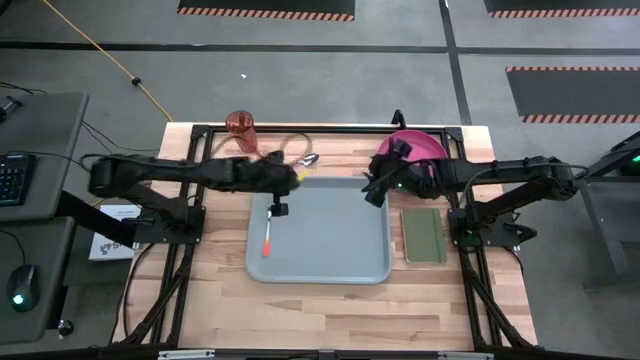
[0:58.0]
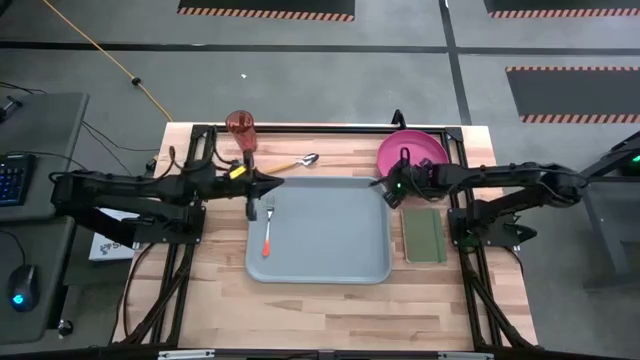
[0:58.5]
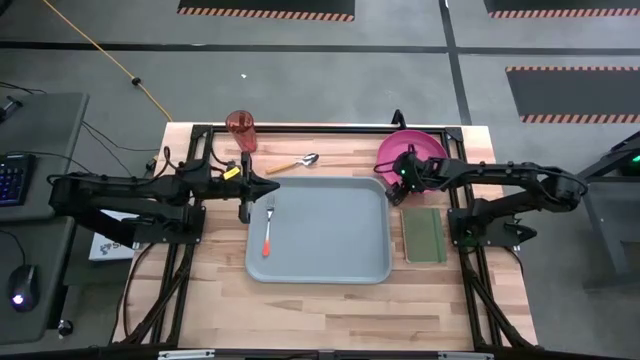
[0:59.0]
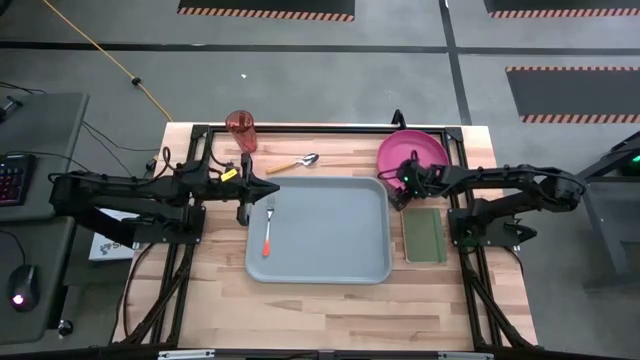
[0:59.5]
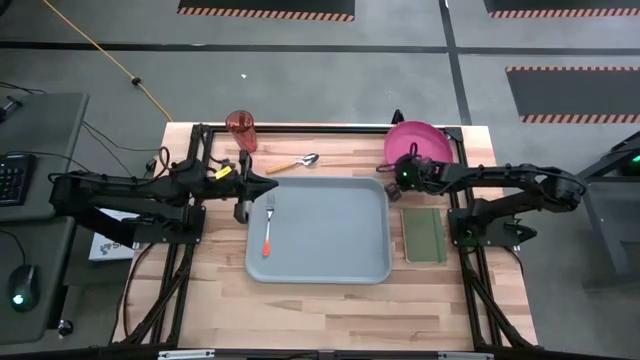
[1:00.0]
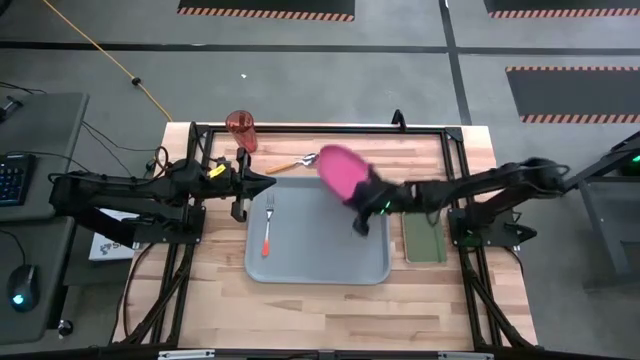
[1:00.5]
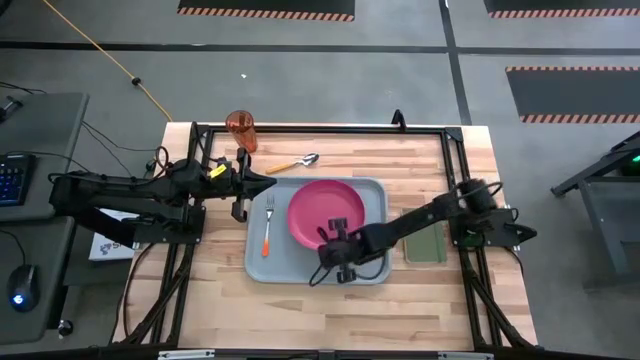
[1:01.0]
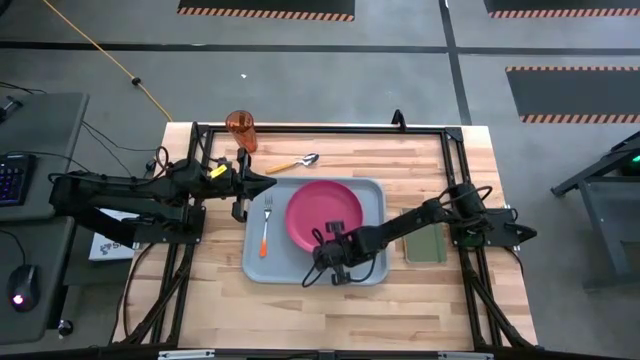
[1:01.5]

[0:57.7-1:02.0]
Task: Pick and place plate/cup/fork/spoon on tray
Put the pink plate on the gray serving tray to the right of the orange fork

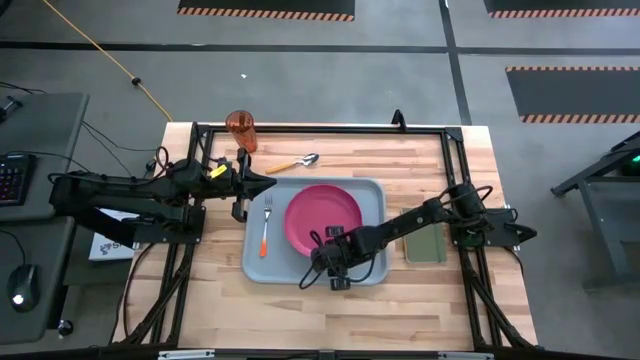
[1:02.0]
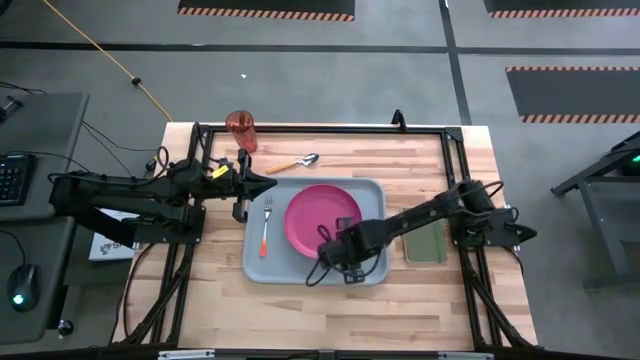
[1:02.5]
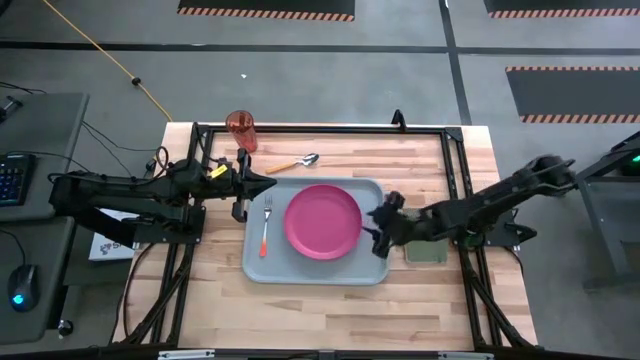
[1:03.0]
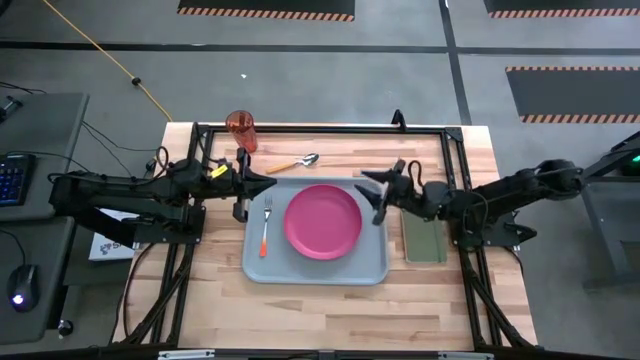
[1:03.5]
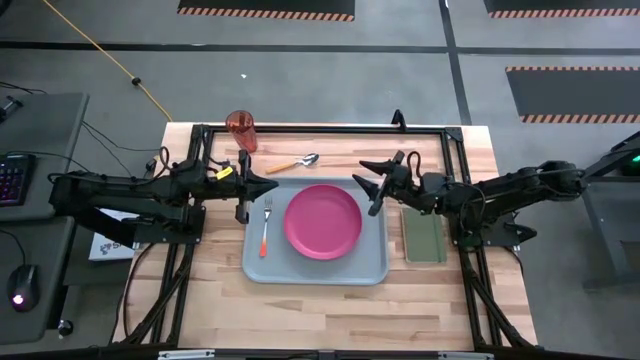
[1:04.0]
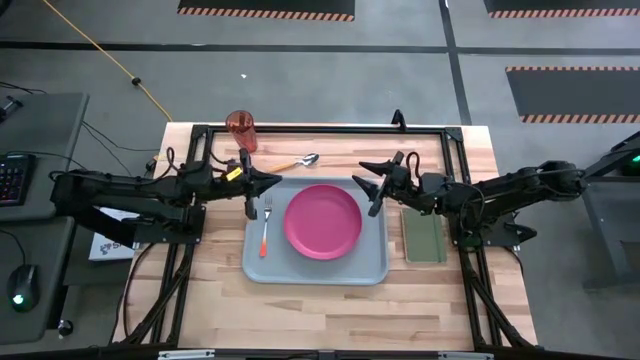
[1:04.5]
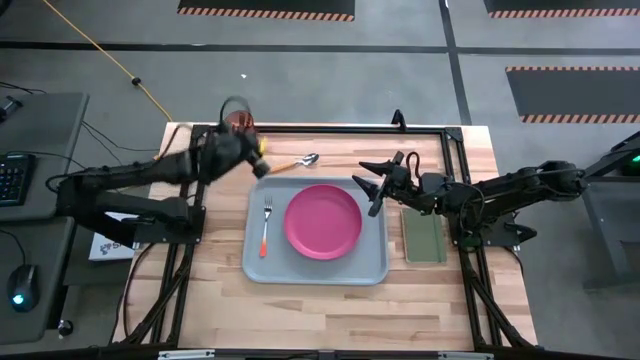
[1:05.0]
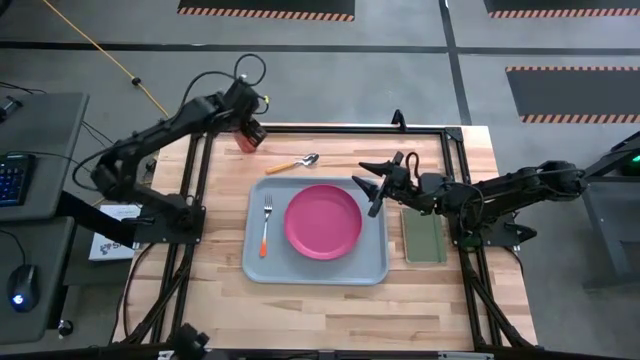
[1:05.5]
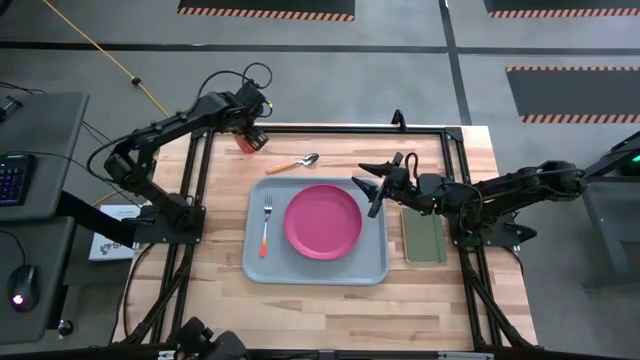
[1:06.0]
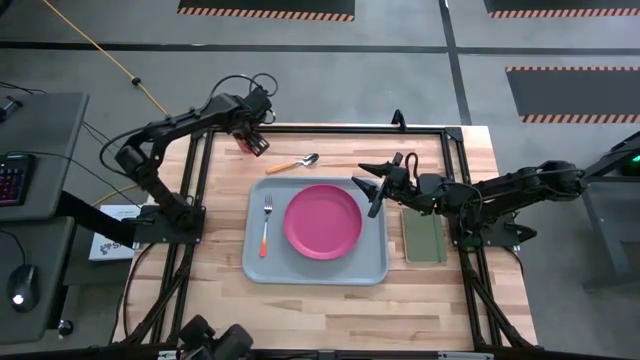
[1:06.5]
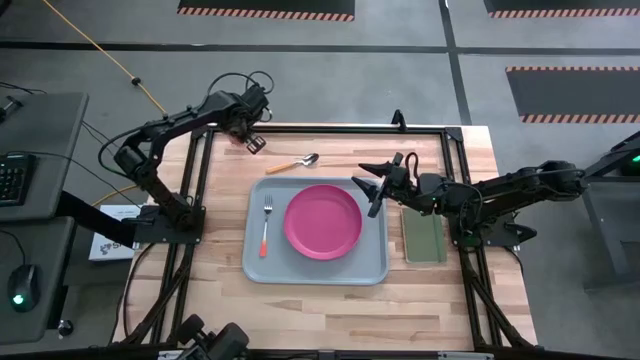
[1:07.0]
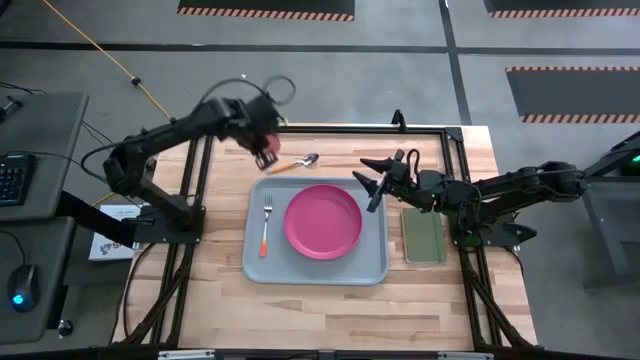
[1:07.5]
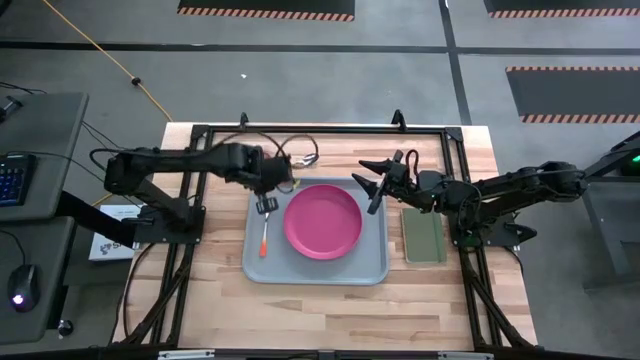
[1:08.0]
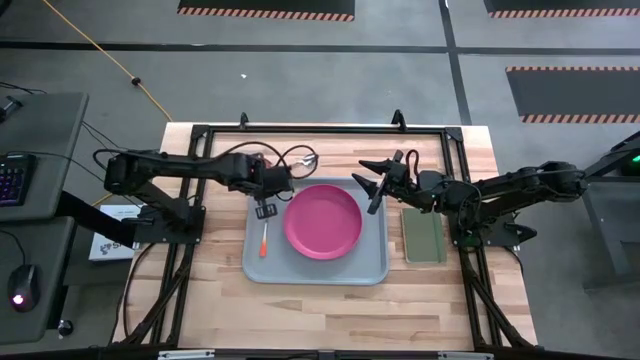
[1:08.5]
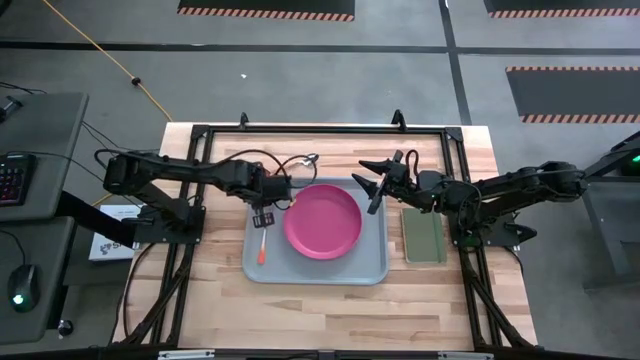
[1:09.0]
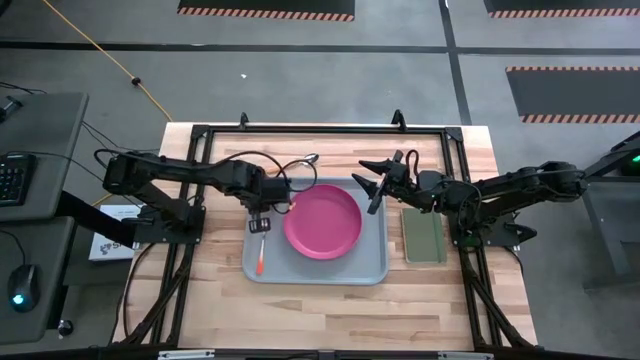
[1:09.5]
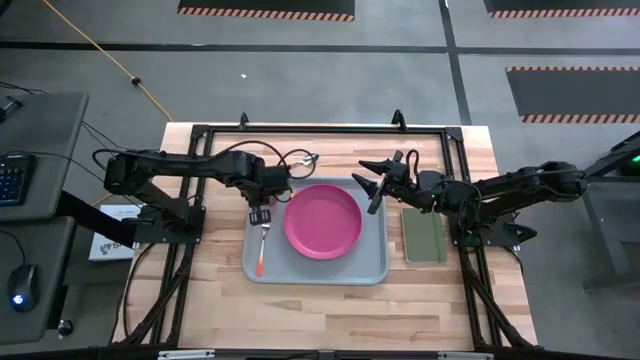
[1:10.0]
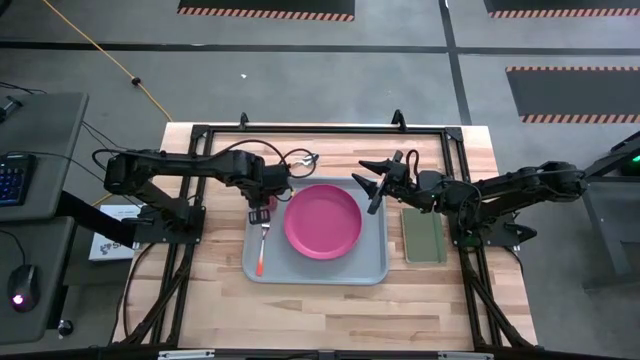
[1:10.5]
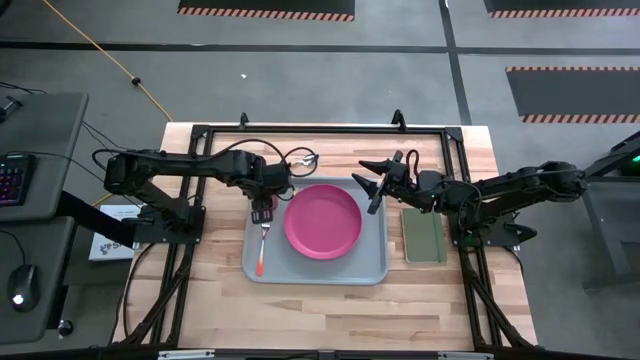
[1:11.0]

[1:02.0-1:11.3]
Put the brown cup on the gray serving tray to the top of the orange fork

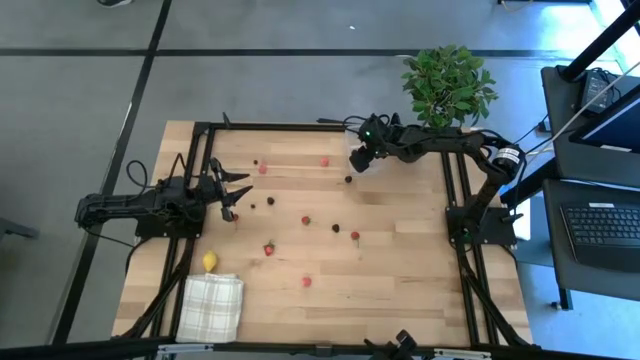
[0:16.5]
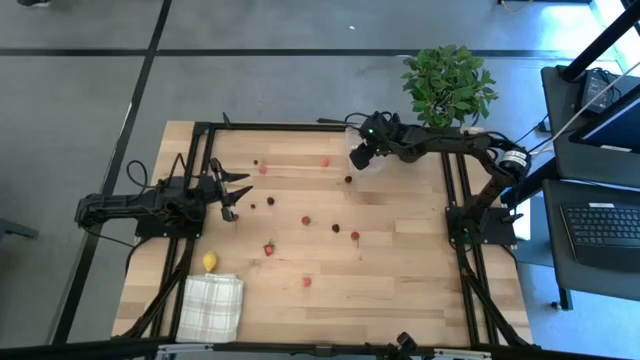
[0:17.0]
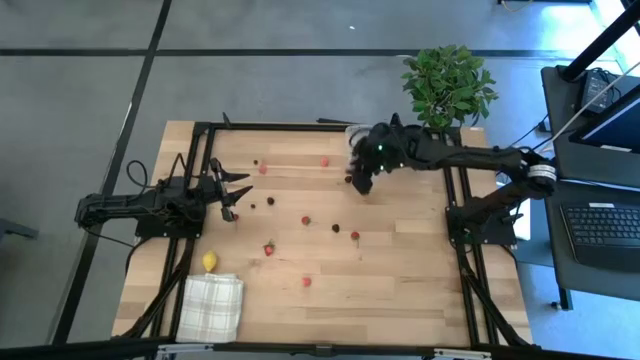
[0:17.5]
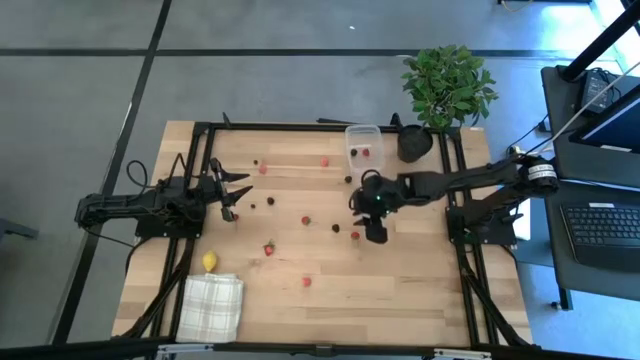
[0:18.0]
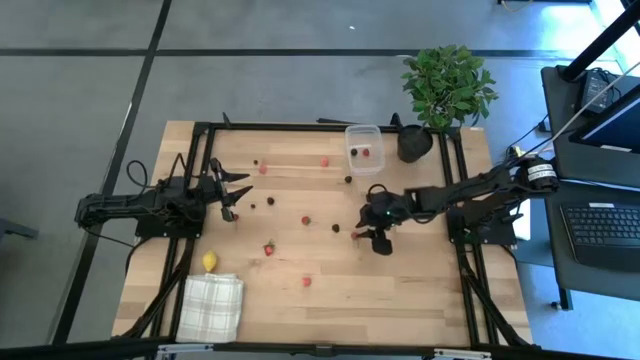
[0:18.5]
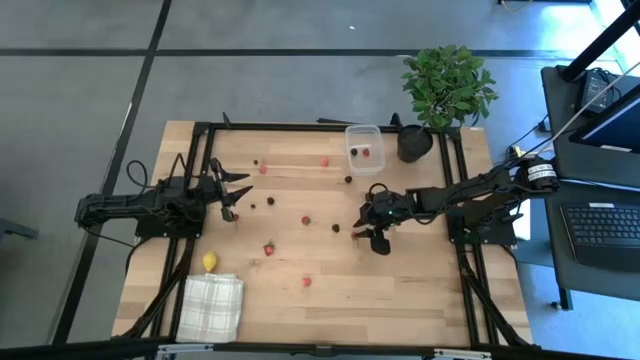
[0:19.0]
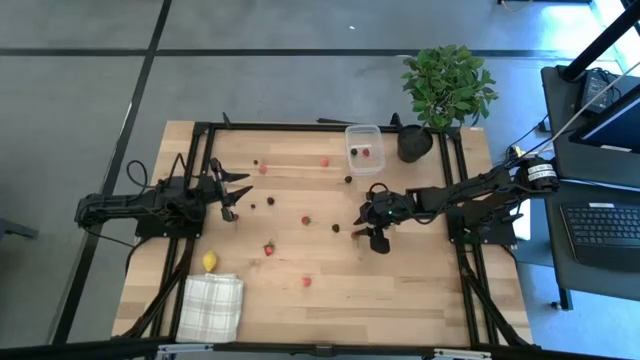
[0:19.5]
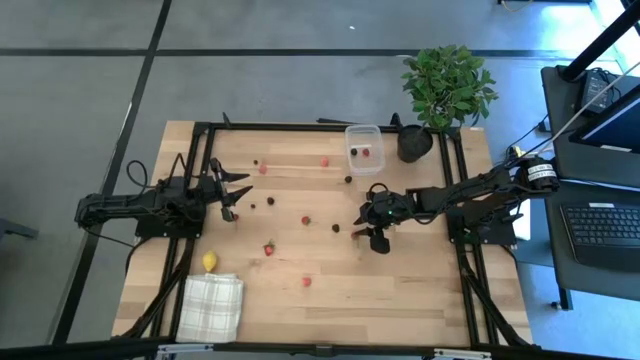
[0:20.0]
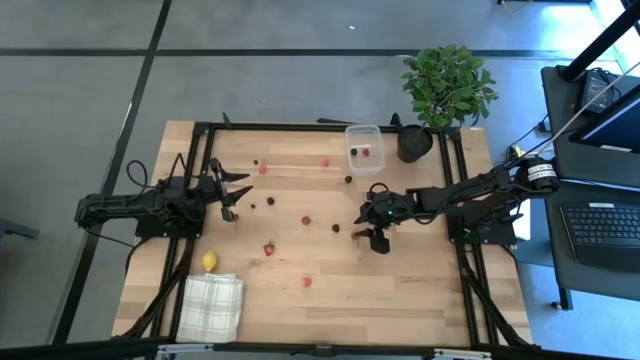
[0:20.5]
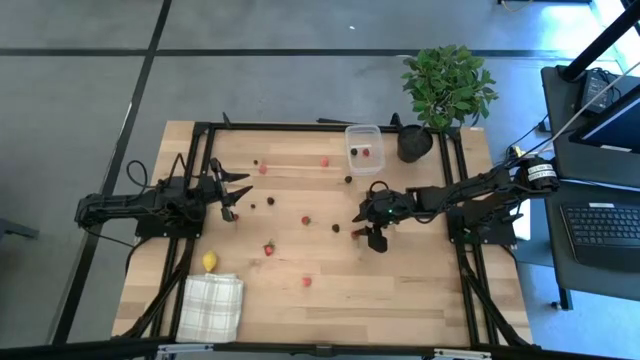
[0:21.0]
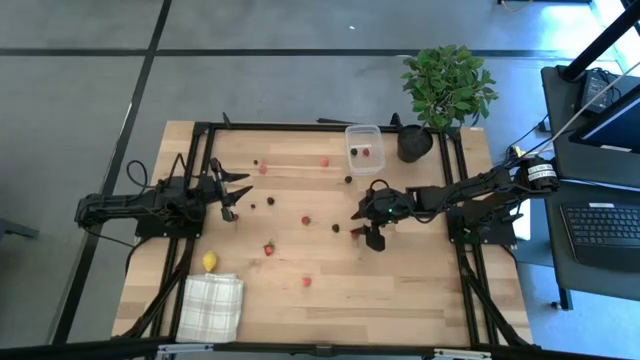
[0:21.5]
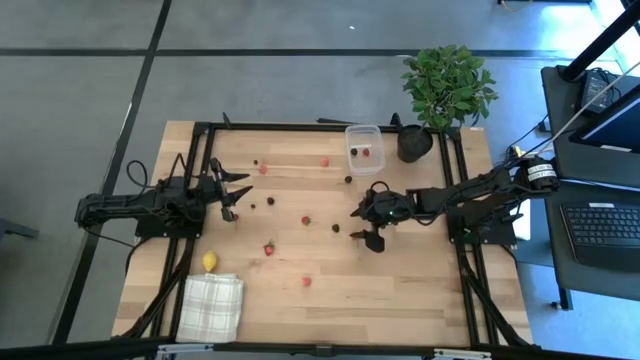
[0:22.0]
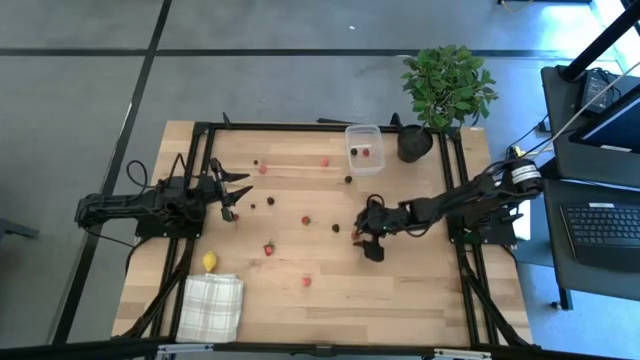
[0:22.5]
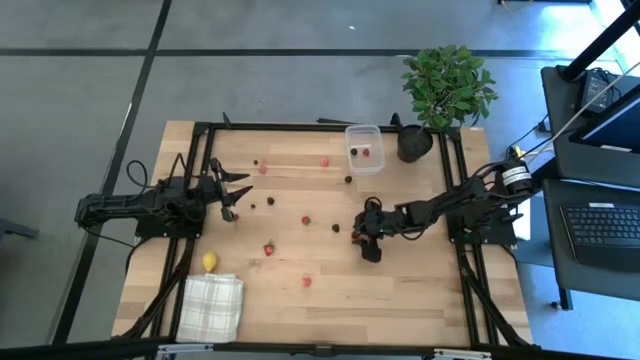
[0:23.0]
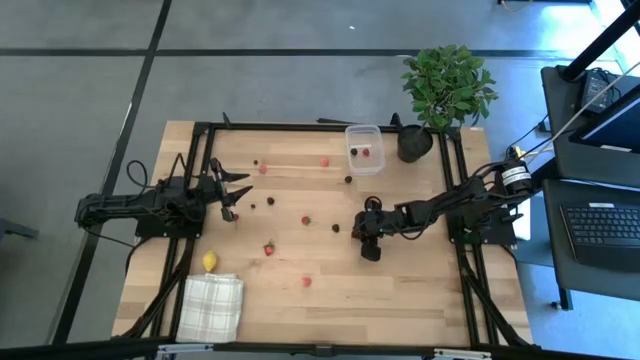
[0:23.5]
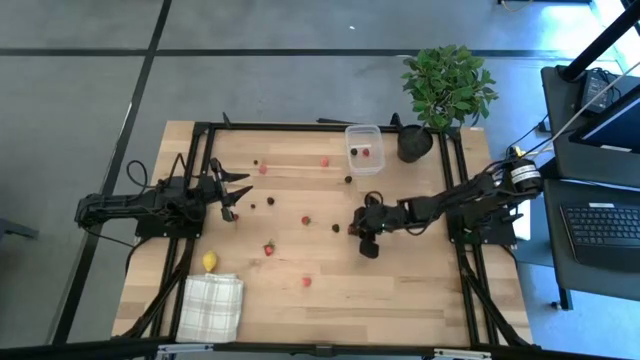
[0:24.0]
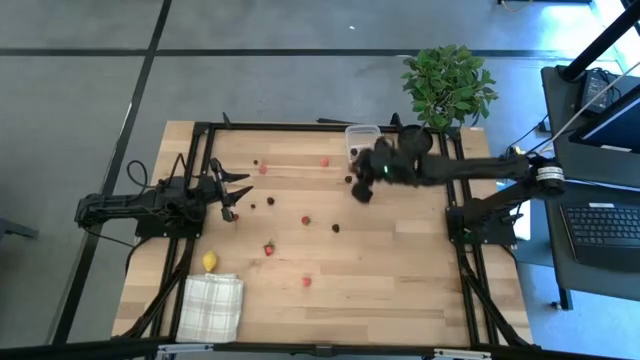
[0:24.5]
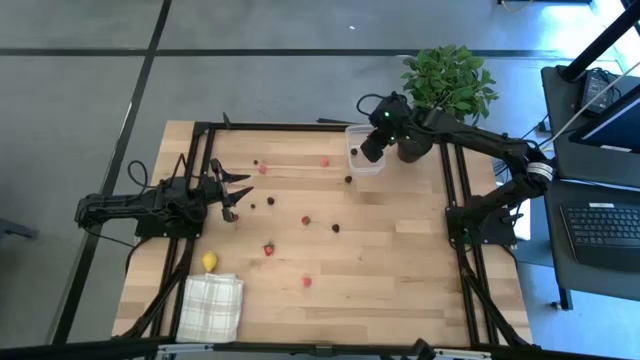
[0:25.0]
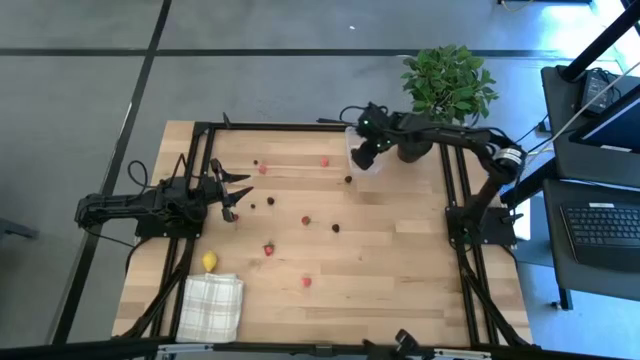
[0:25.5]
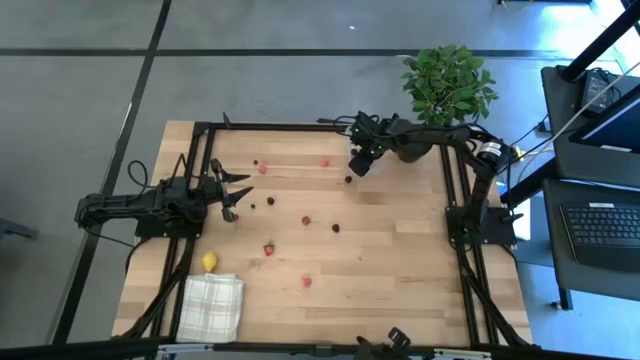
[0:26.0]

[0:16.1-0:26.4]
Task: Pick and placing Produce into tupperware
Put the right strawberry into the transparent bin
